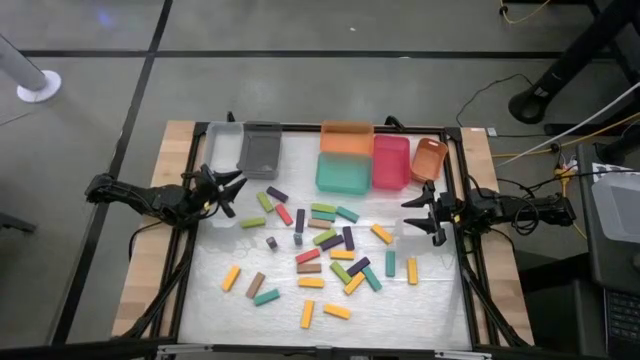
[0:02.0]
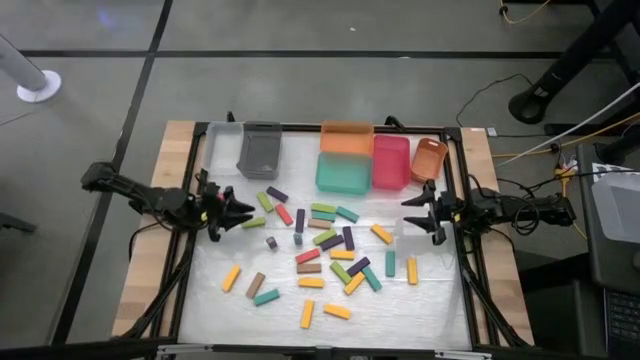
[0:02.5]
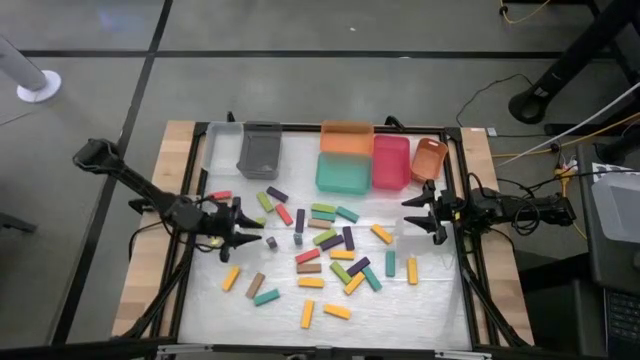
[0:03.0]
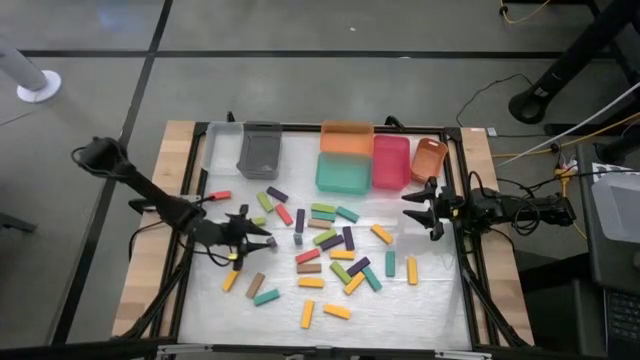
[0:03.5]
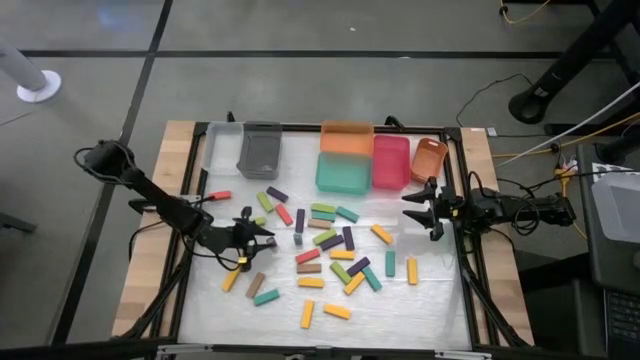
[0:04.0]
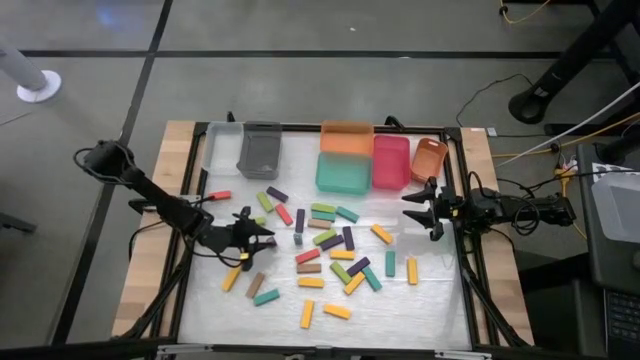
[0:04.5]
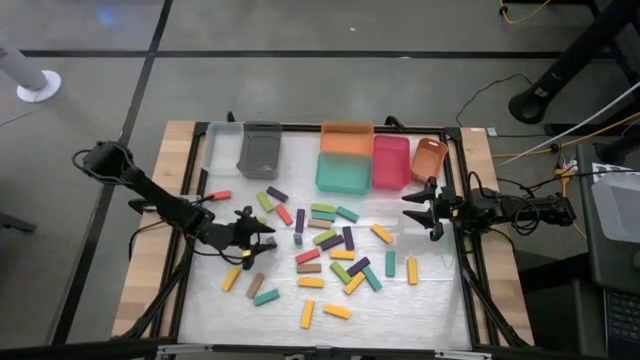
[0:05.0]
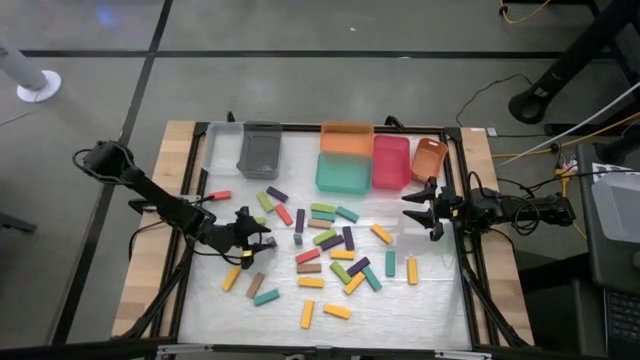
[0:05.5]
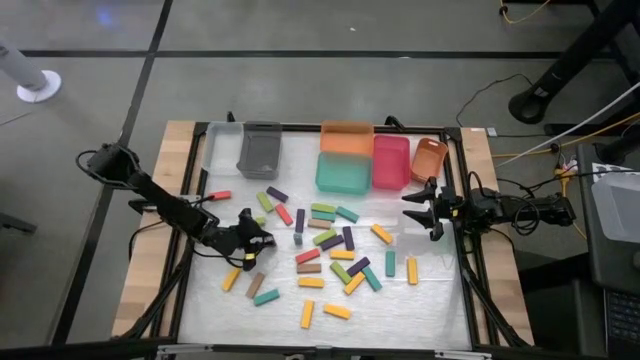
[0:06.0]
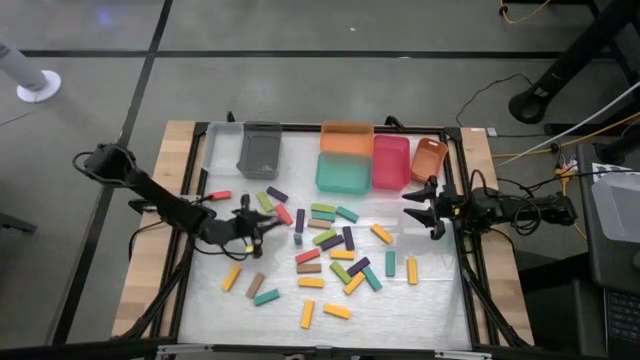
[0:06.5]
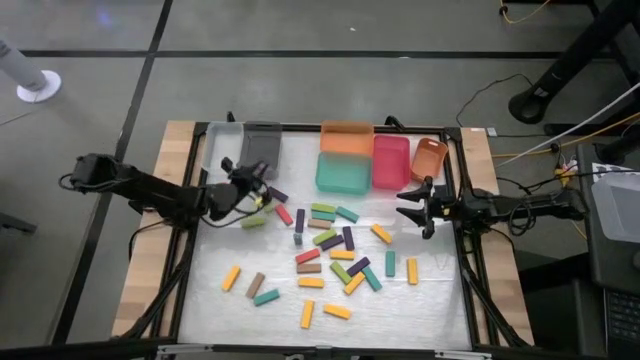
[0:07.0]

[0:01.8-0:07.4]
Task: Sort blocks
Put the violet block into the black bin

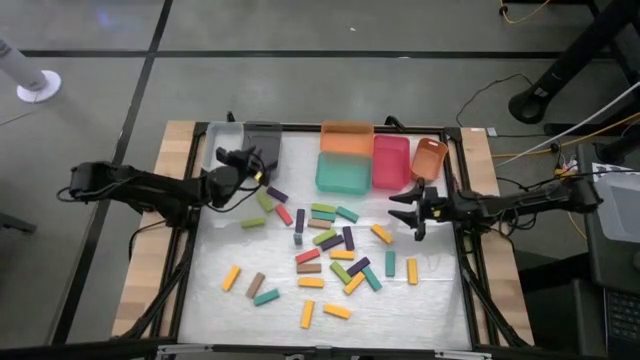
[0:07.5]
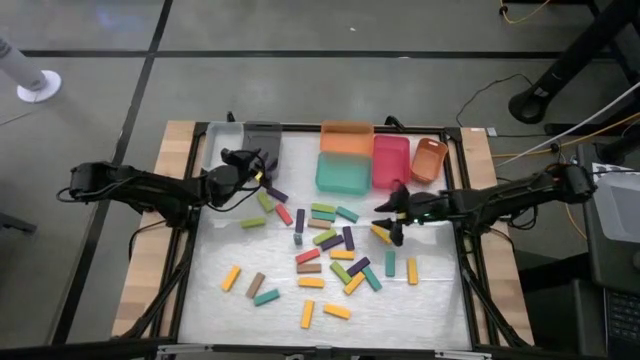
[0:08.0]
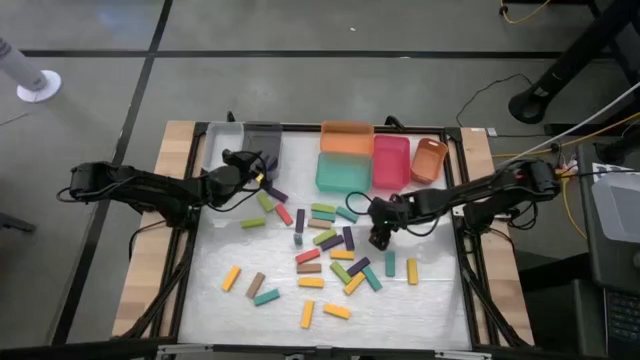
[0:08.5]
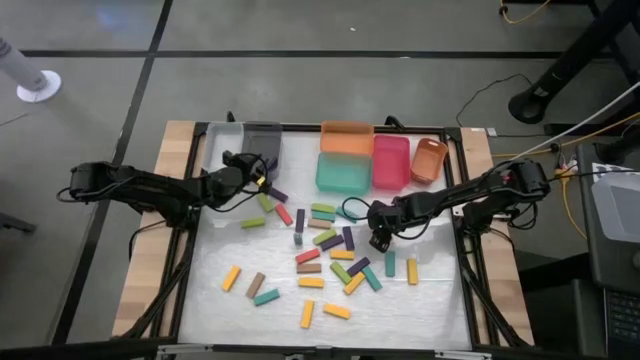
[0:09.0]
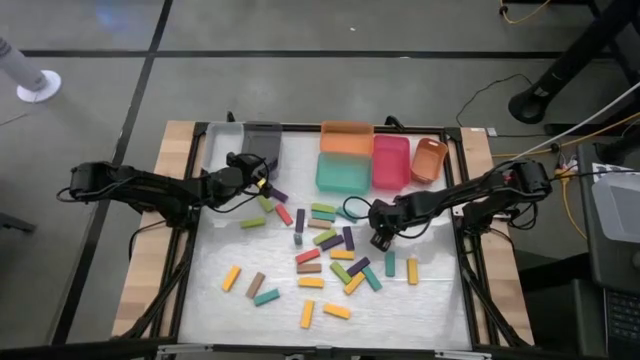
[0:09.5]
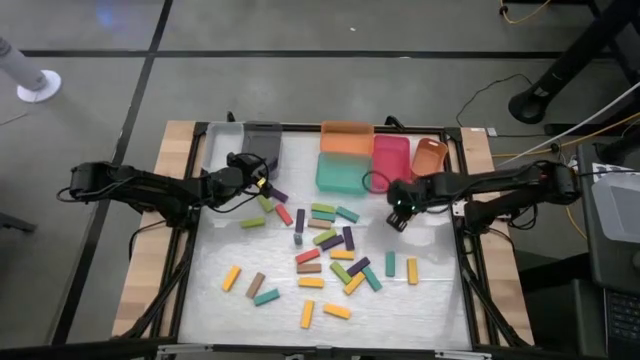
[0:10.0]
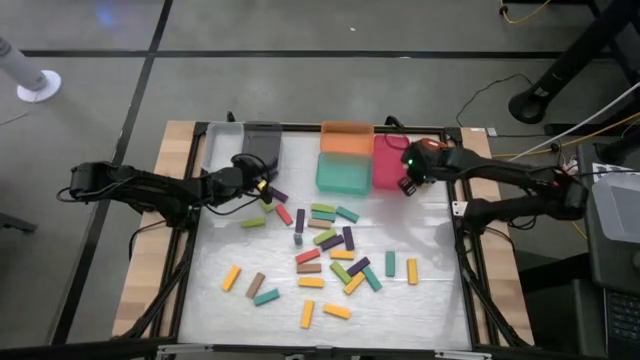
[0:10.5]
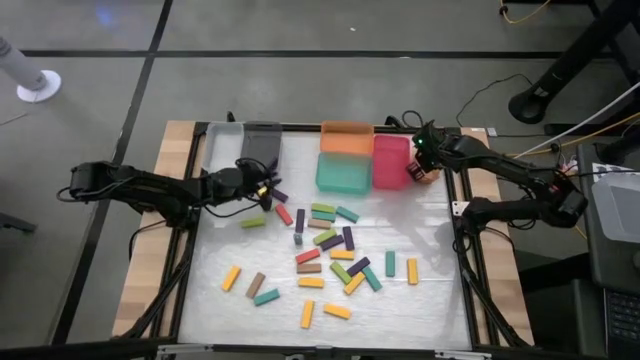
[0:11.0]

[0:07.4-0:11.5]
Put the yellow block into the right orange bin

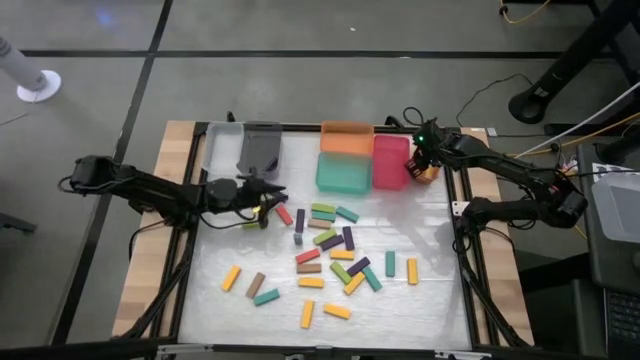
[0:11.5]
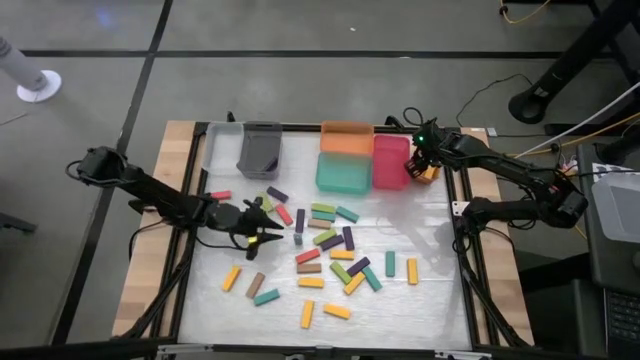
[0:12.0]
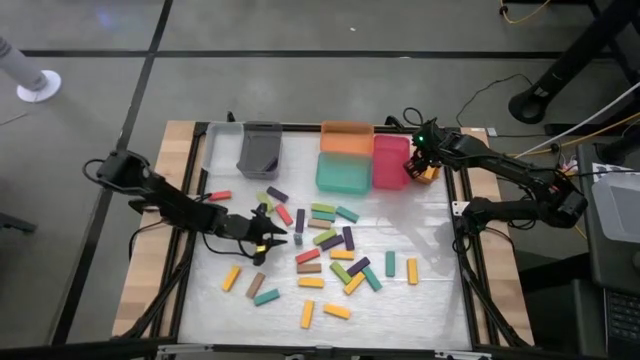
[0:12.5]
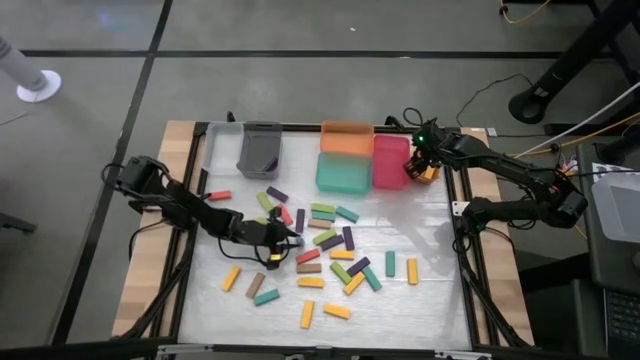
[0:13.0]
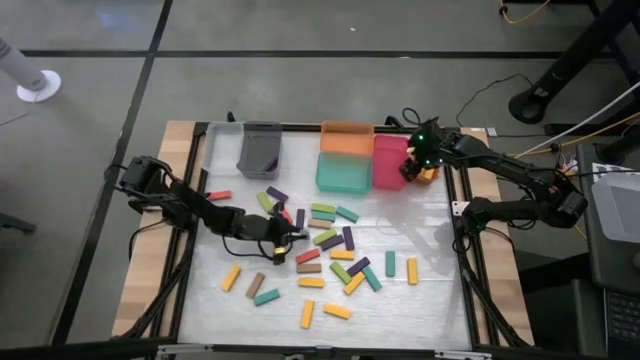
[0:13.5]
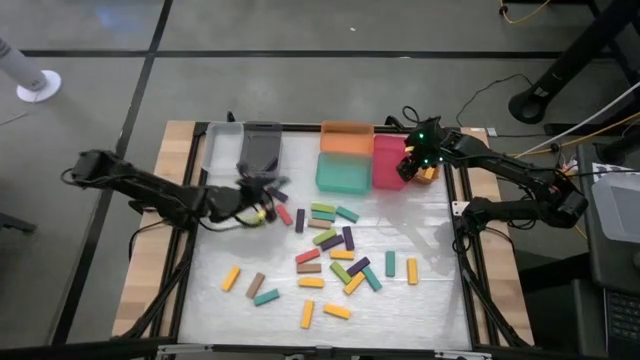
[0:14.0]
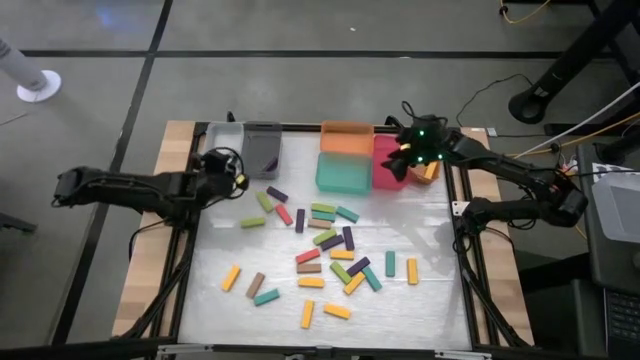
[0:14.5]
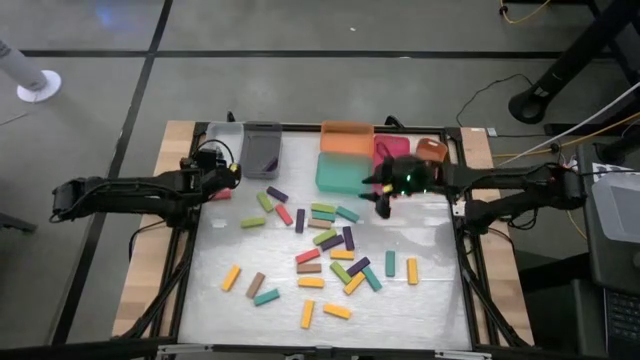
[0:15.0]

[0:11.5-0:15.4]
Put the light blue block into the transparent bin

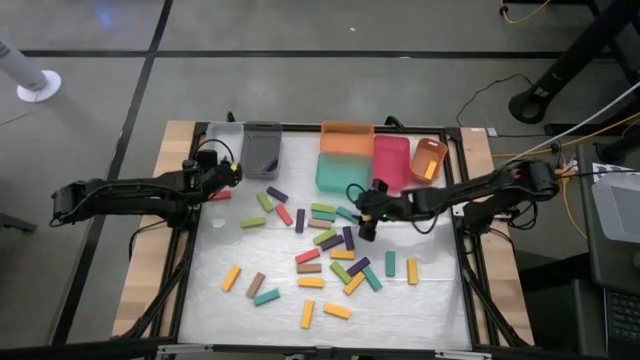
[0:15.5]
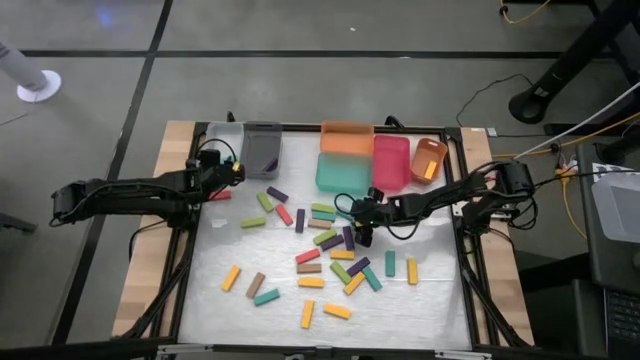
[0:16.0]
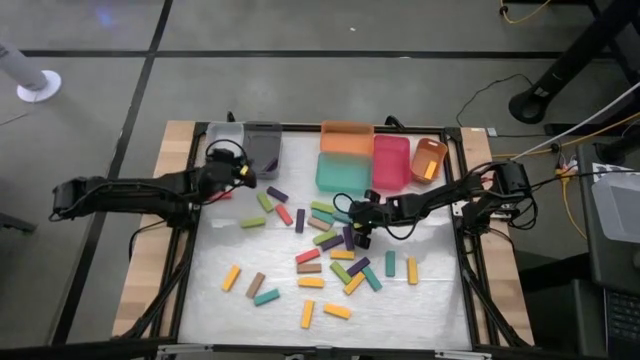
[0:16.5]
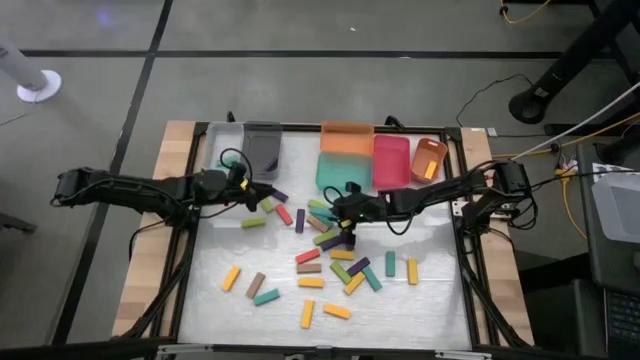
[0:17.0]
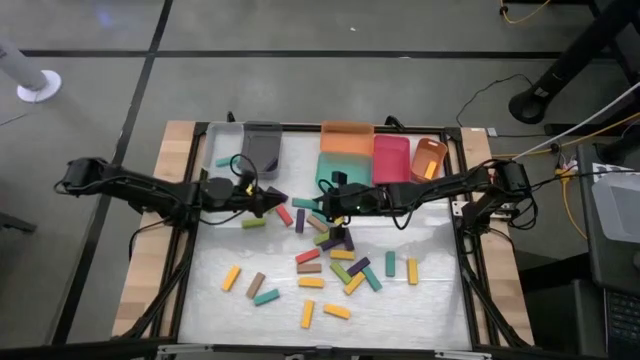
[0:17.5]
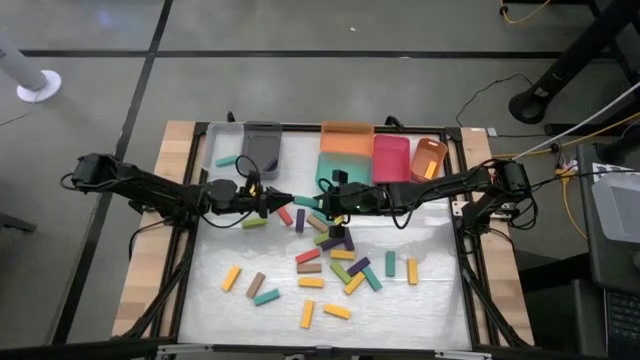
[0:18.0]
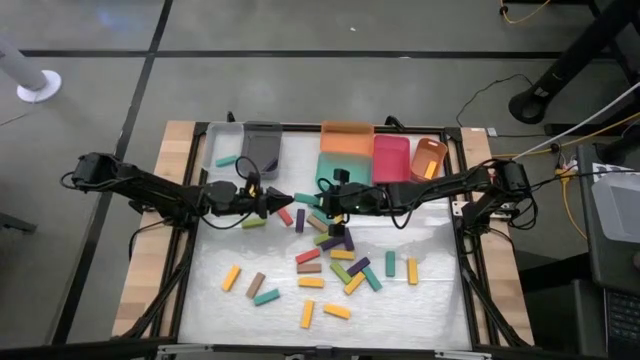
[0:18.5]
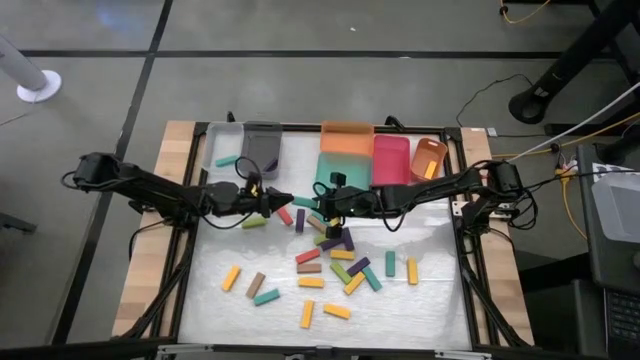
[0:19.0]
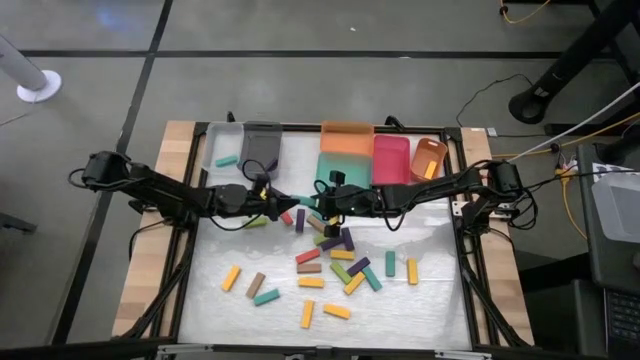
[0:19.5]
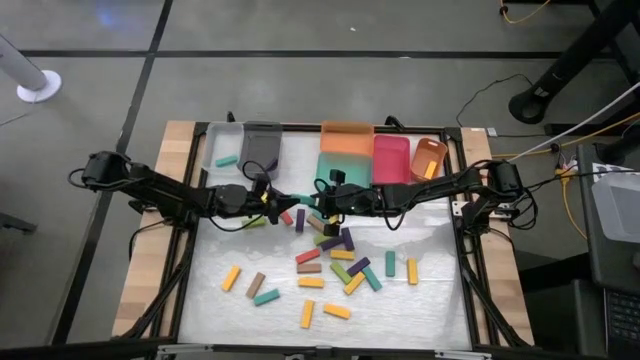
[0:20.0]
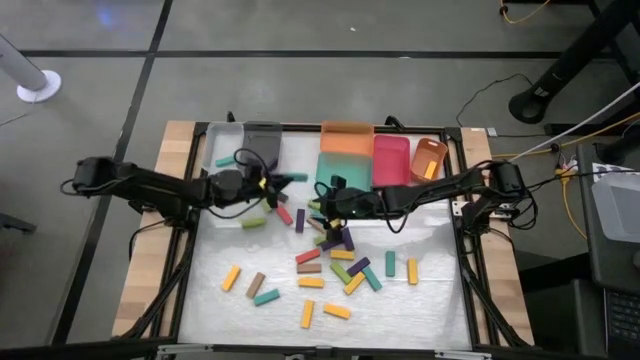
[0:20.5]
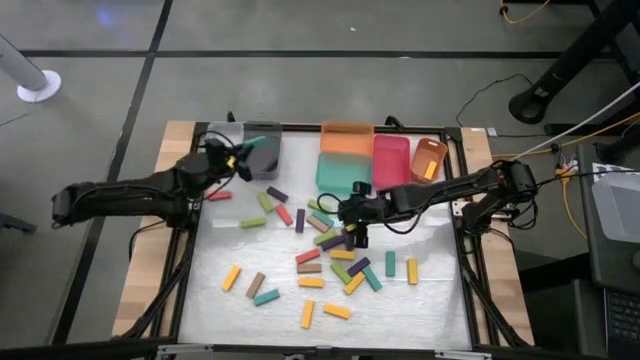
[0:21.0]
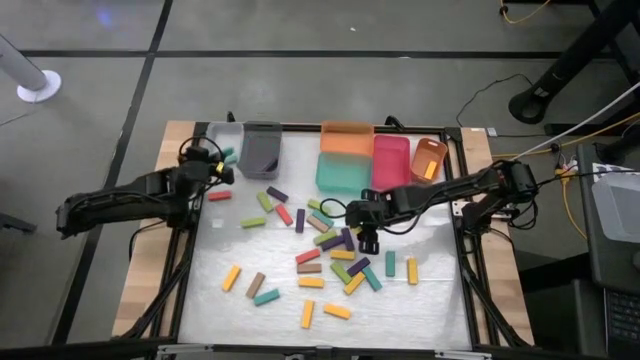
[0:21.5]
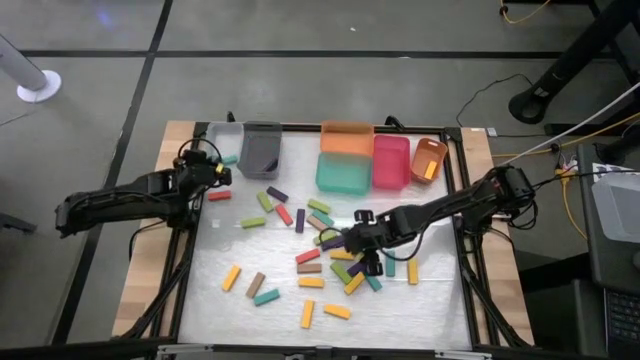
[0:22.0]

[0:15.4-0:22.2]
Put the light blue block into the transparent bin

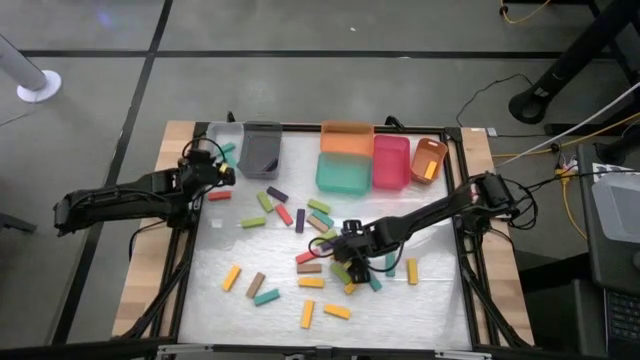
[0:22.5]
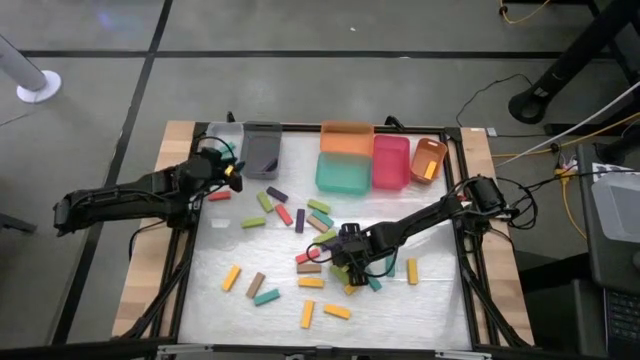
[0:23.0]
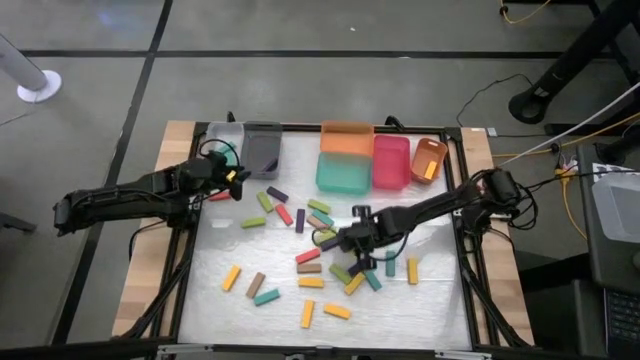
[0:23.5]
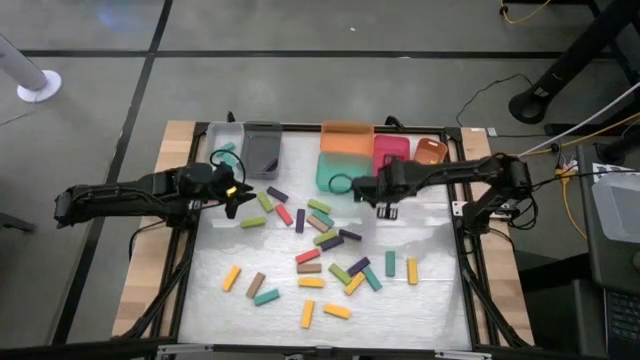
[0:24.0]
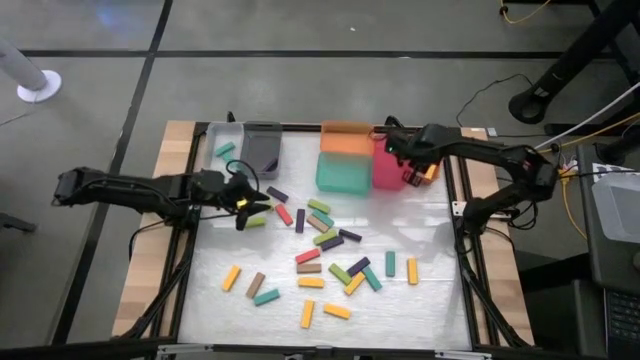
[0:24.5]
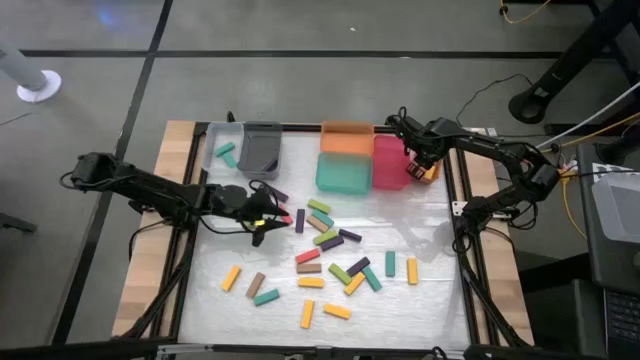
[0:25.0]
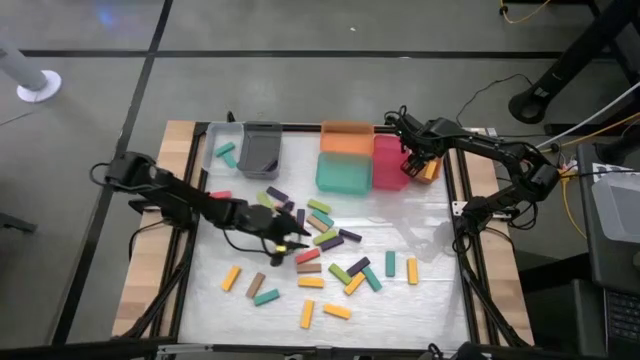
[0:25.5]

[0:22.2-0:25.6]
Put the yellow block into the right orange bin
